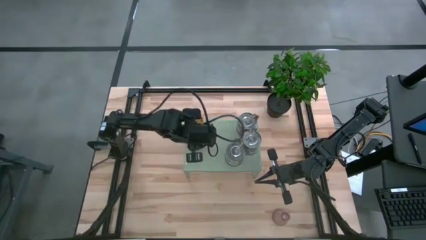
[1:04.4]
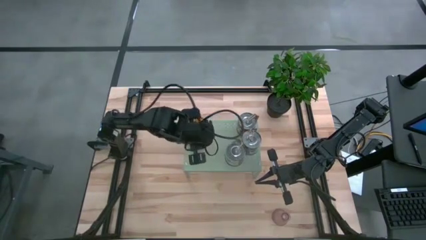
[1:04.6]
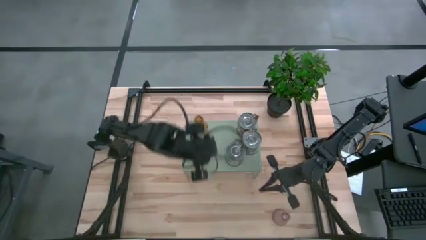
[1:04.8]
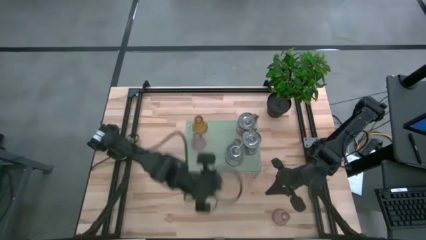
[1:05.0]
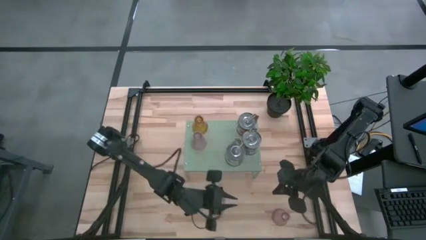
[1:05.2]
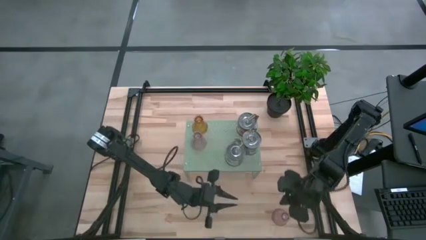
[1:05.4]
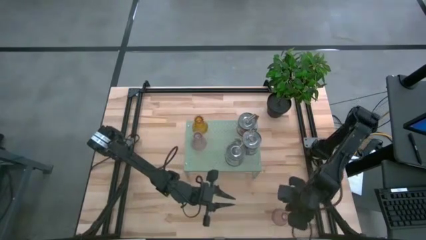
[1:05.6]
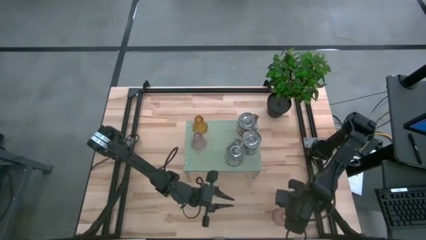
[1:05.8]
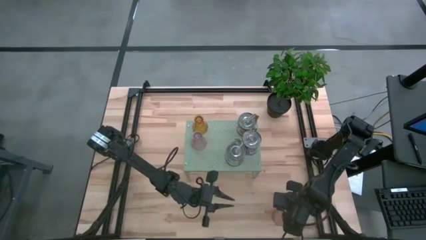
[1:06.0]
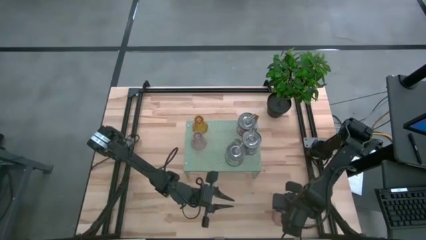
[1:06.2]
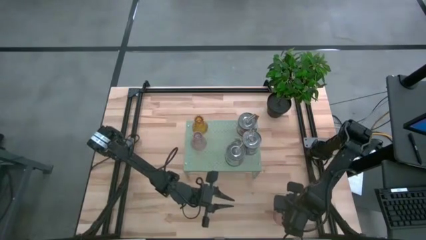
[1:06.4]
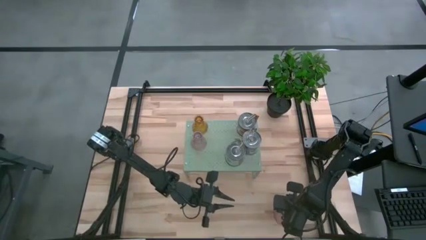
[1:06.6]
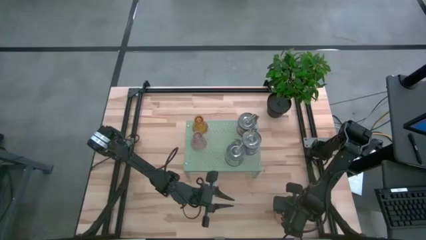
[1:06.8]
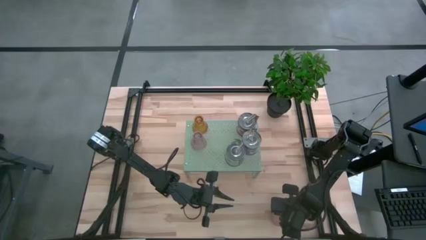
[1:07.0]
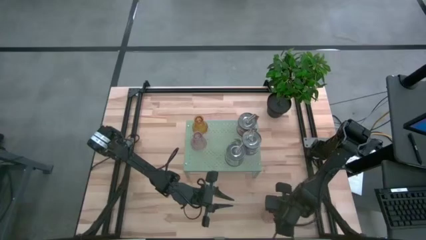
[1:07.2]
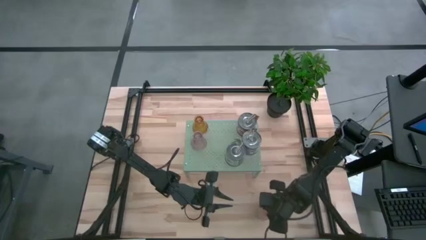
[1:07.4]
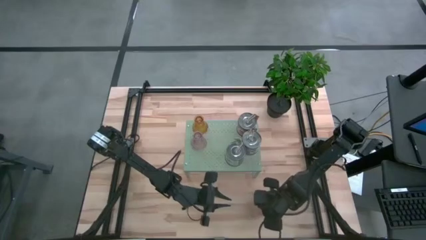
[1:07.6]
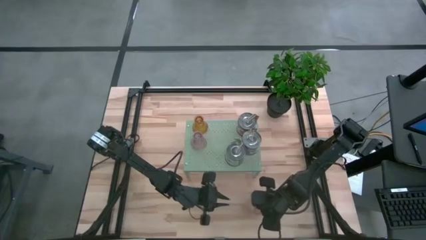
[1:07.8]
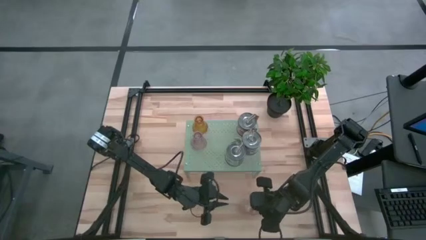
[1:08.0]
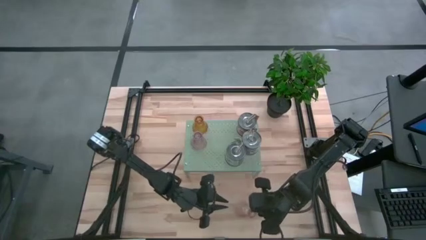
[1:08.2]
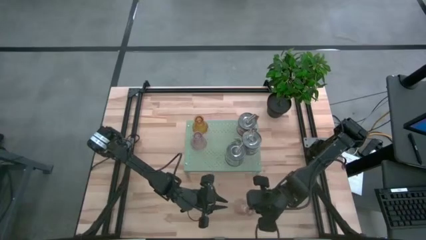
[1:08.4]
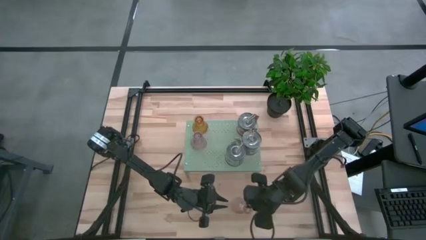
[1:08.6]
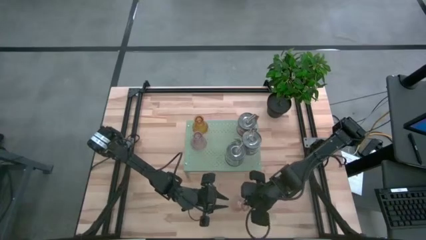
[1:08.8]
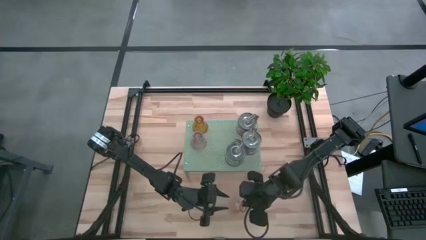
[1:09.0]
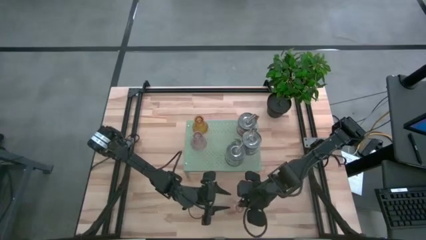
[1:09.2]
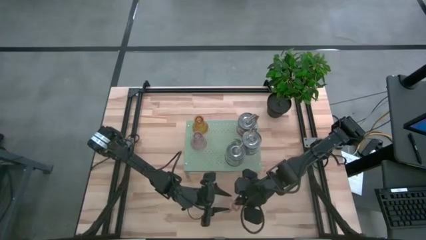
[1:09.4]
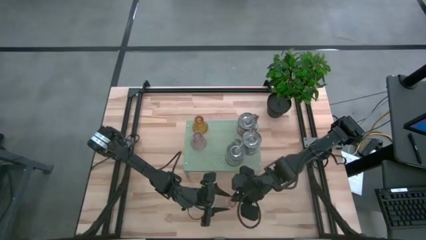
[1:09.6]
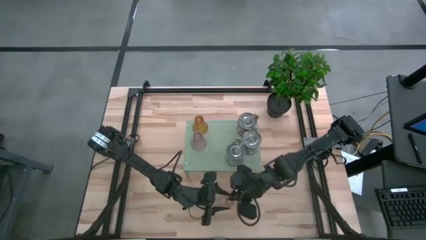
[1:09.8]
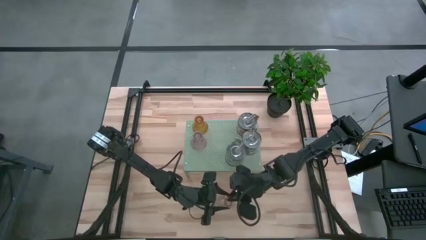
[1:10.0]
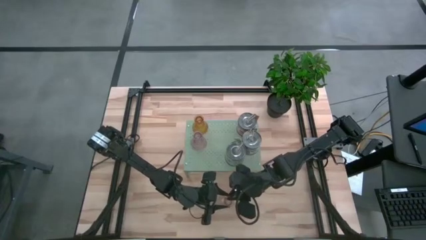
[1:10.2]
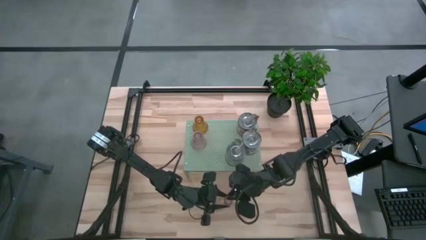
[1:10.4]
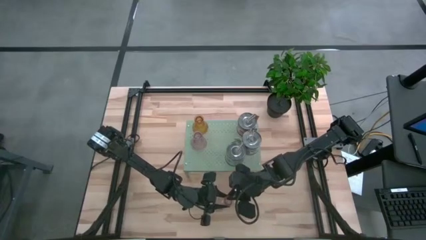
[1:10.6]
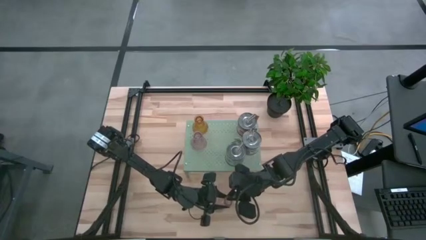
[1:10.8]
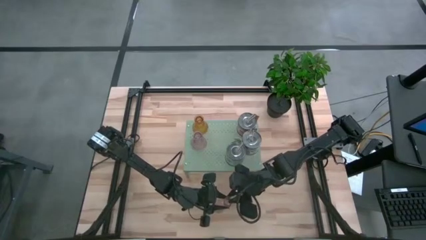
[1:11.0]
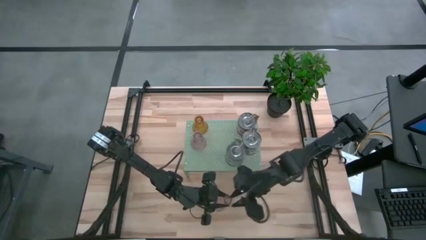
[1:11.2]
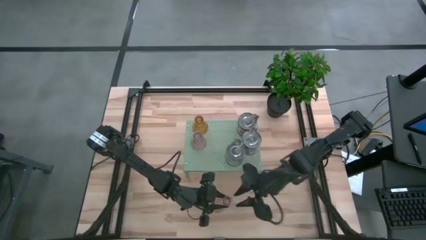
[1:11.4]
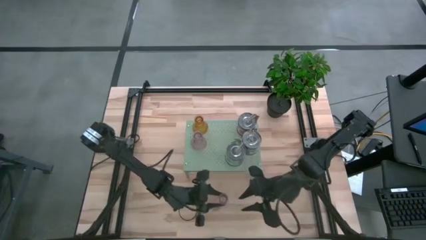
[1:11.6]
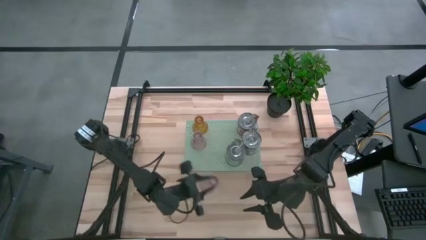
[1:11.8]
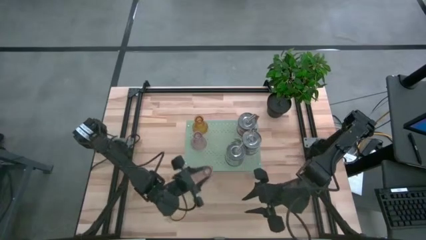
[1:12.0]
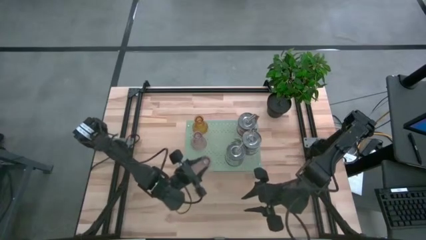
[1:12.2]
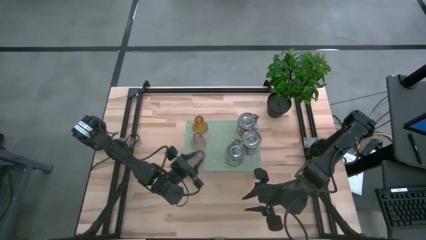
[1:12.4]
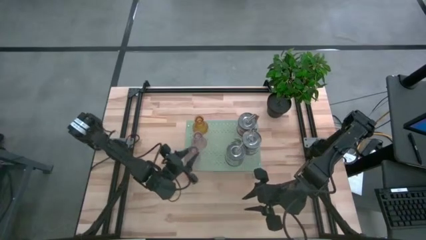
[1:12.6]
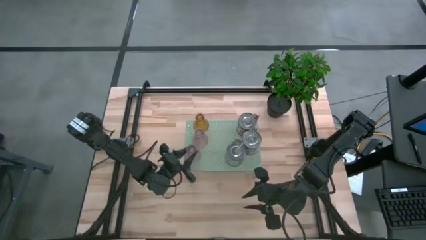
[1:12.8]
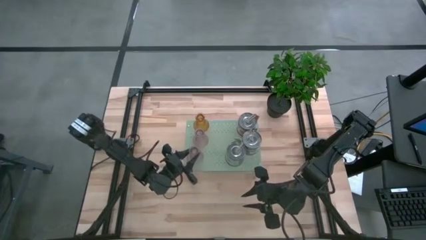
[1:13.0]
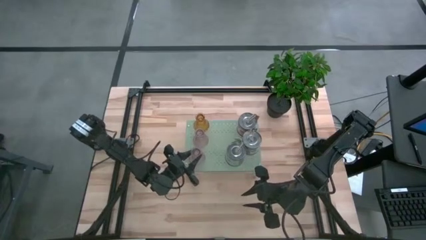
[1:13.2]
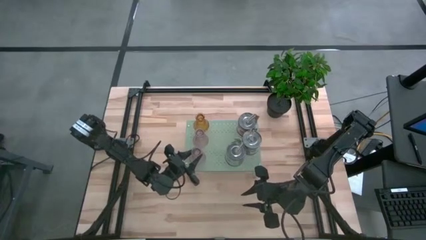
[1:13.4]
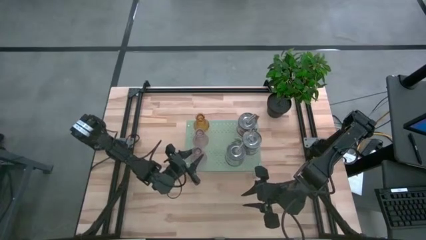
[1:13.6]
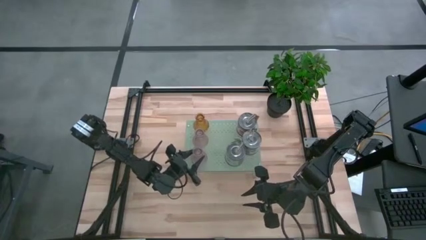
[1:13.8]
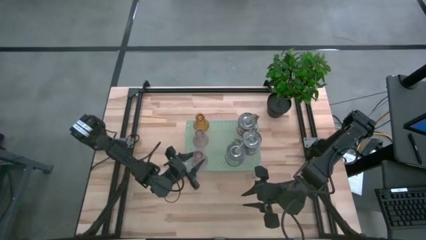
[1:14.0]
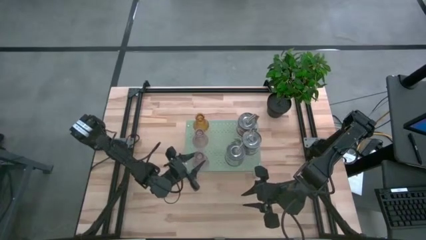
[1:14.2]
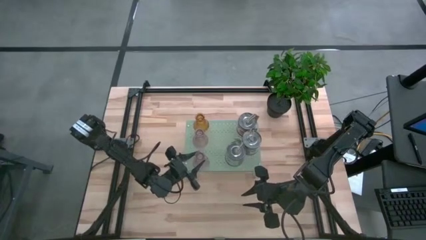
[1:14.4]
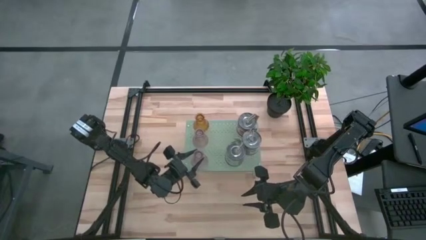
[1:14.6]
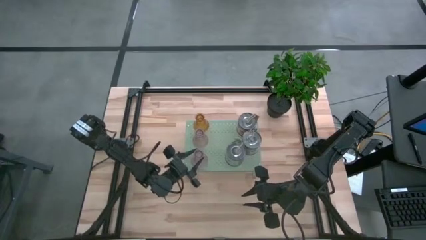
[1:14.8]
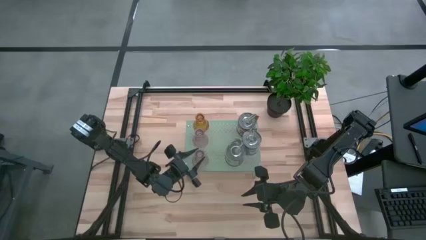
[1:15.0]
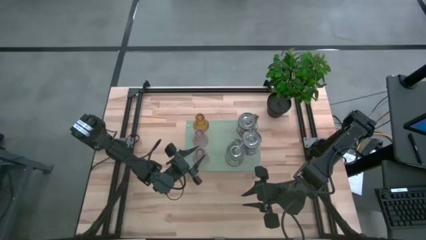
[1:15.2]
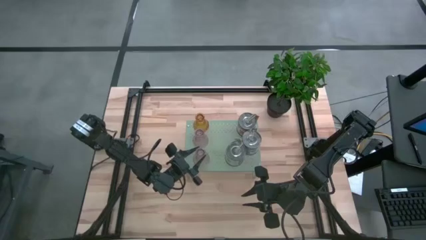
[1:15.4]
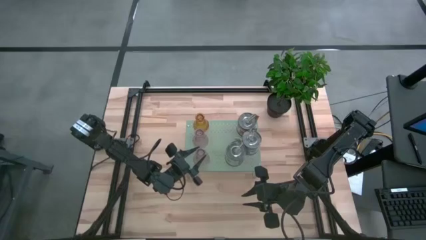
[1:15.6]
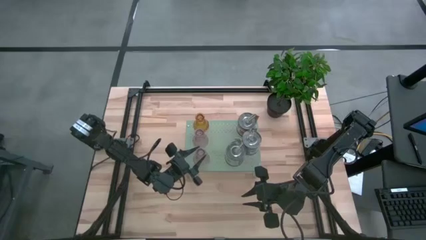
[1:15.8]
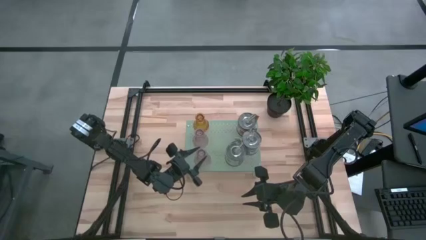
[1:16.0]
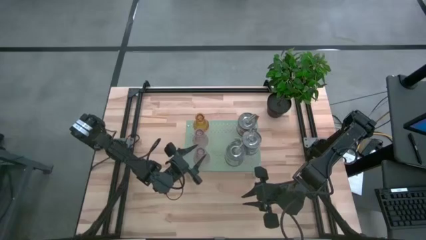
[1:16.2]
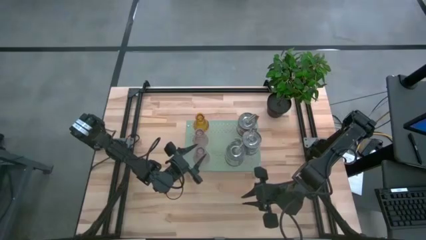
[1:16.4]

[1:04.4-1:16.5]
Task: Pick & Place candle stick holders
Put the pink candle holder on the shelf

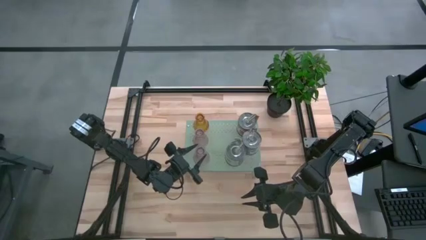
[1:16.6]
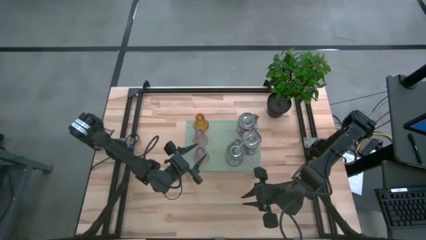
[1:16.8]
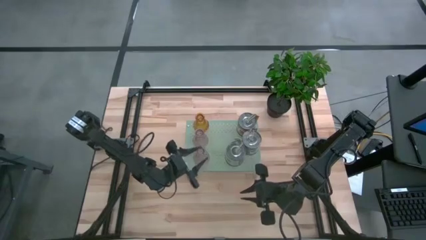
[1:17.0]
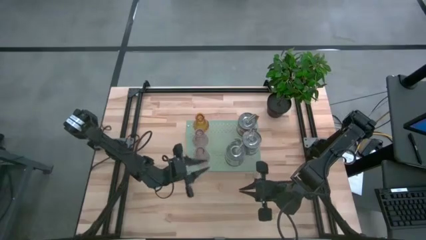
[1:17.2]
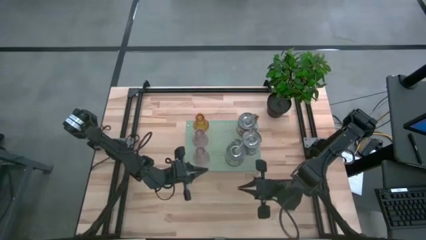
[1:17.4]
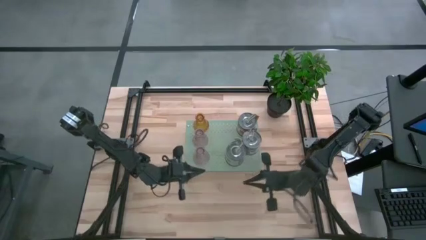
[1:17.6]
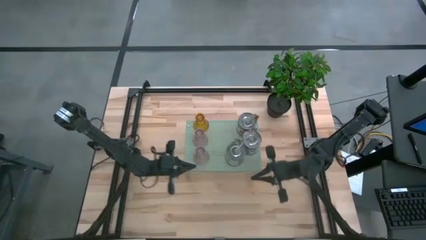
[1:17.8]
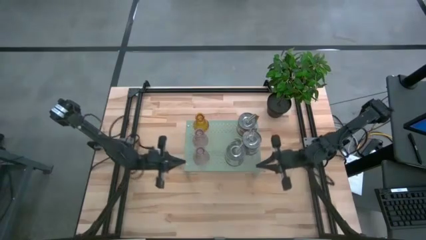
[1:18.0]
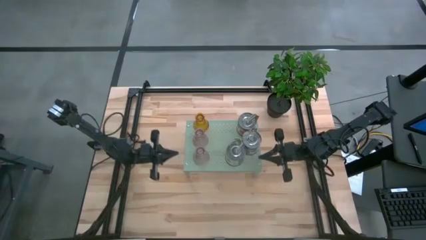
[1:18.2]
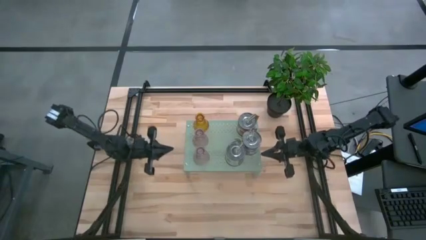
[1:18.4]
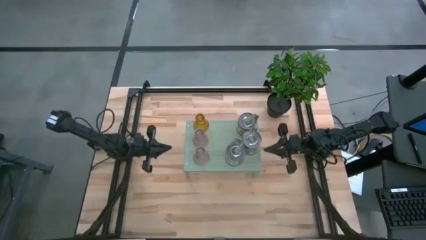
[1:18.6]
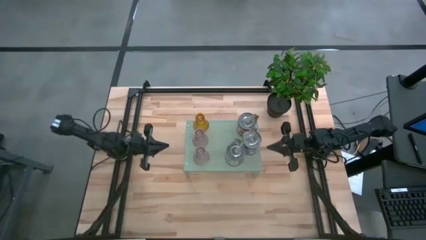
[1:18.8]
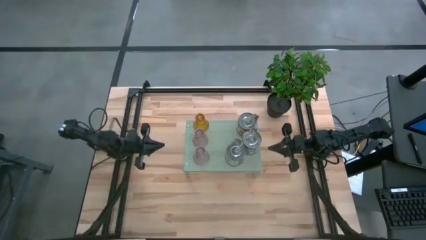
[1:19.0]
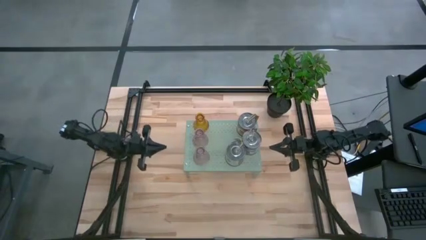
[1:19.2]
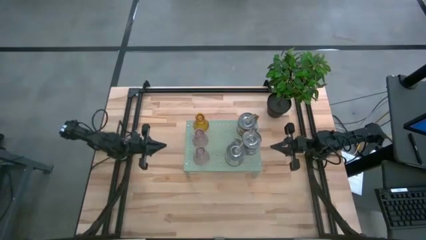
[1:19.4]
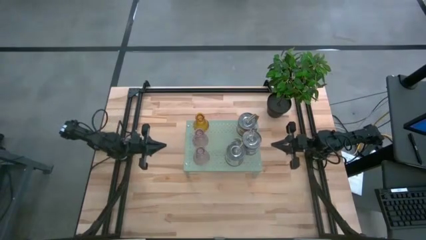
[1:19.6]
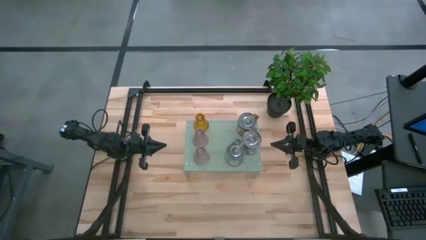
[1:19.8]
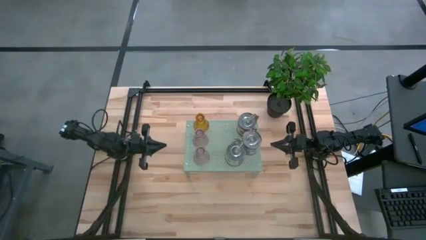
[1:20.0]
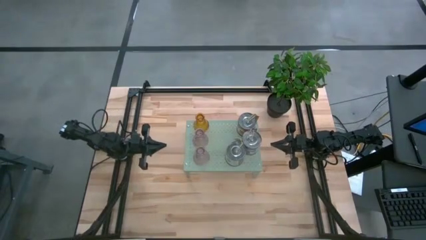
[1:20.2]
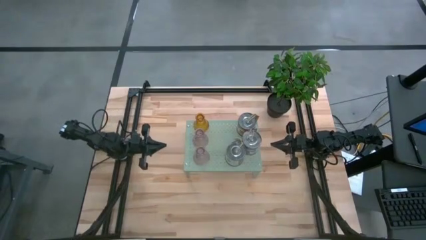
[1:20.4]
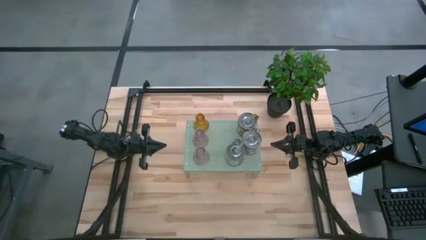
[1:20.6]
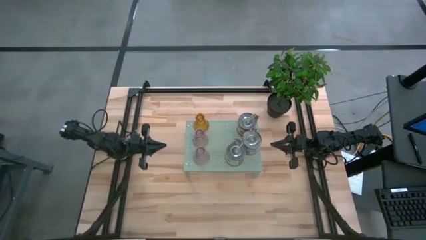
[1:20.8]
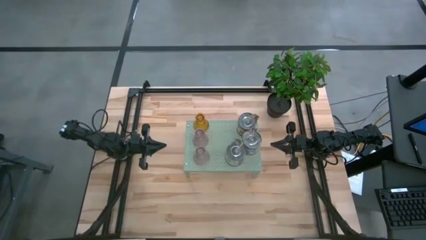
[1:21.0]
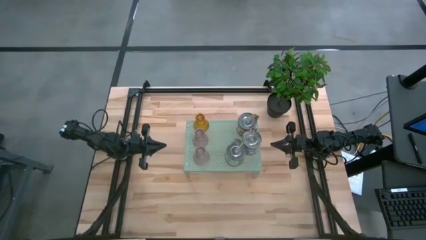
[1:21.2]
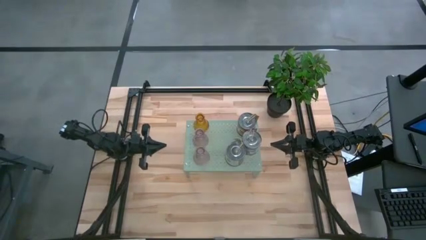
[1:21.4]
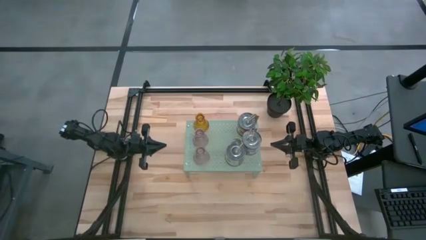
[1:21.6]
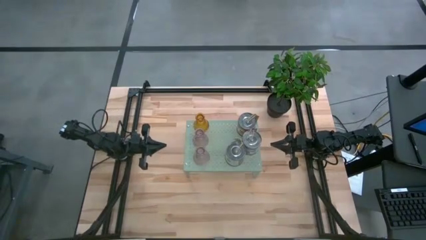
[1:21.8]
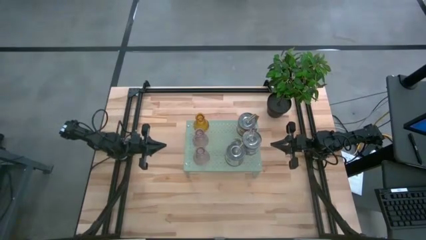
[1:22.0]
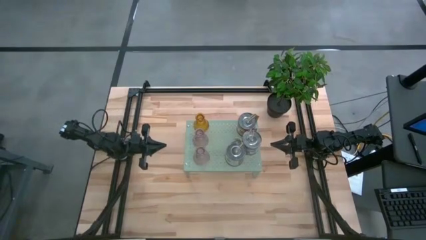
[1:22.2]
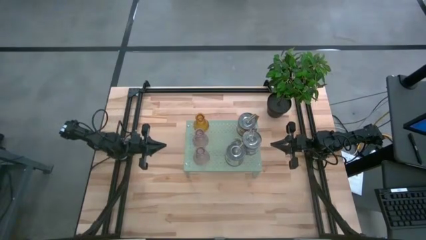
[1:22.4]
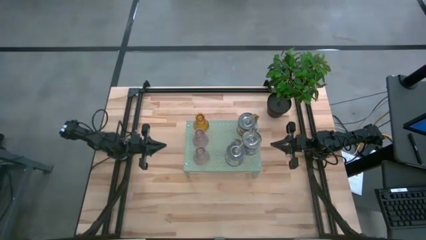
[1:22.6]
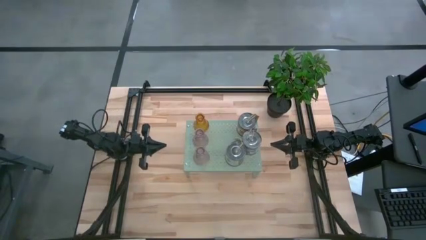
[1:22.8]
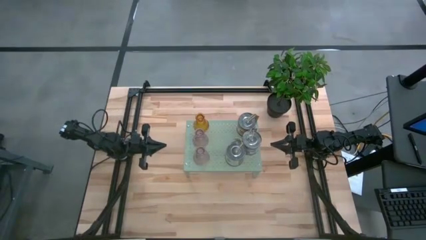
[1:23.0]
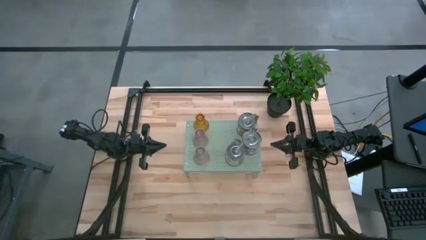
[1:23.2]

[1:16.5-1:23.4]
Return to Home Position
